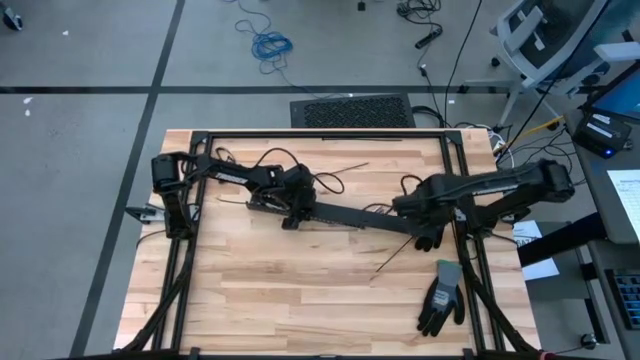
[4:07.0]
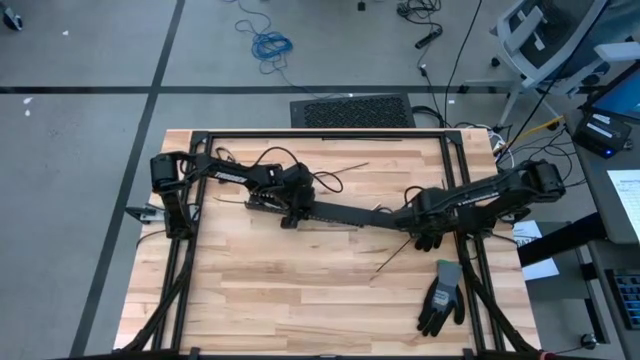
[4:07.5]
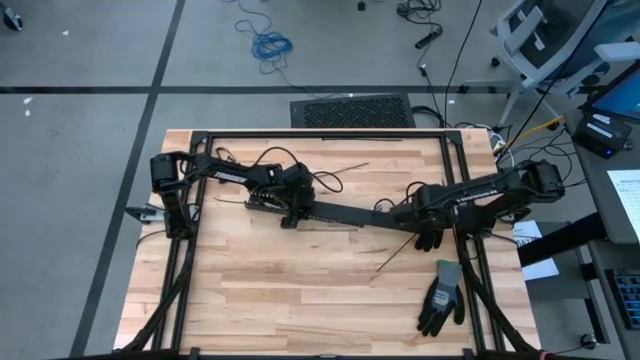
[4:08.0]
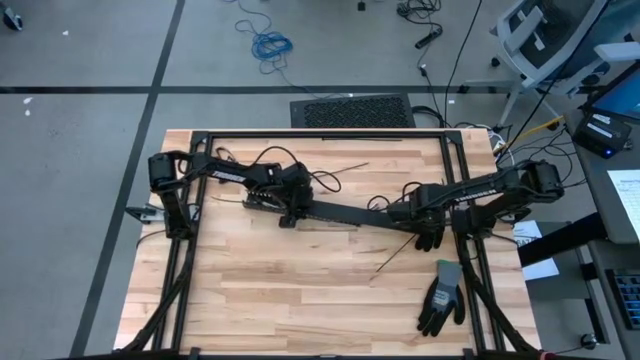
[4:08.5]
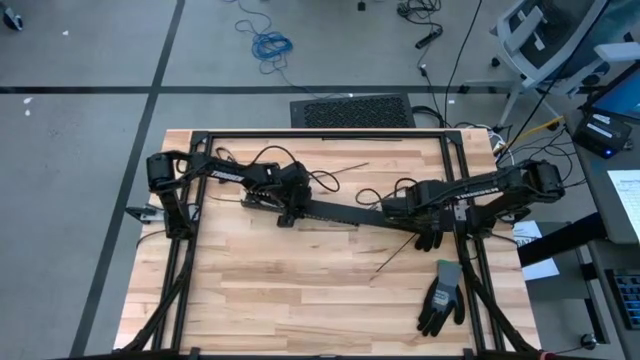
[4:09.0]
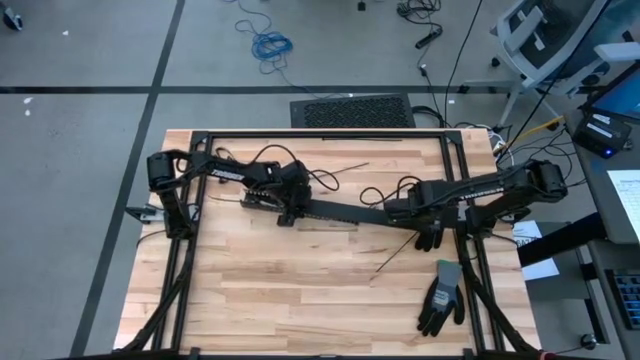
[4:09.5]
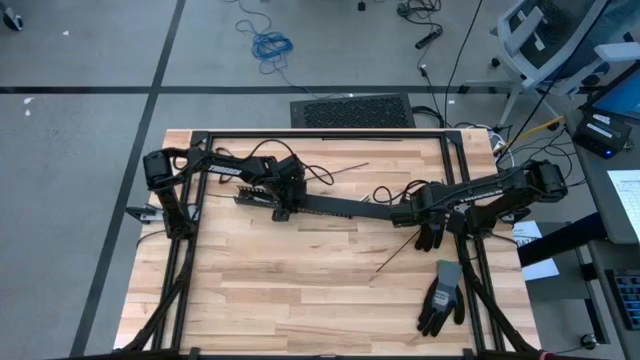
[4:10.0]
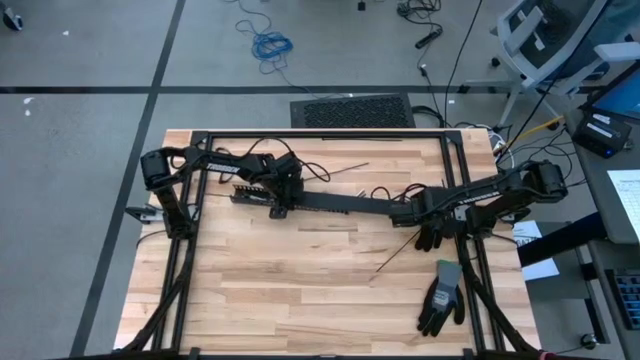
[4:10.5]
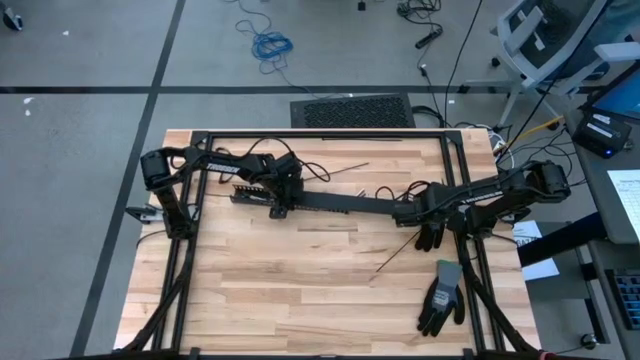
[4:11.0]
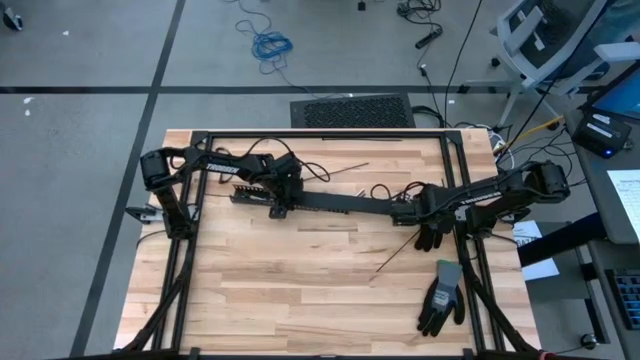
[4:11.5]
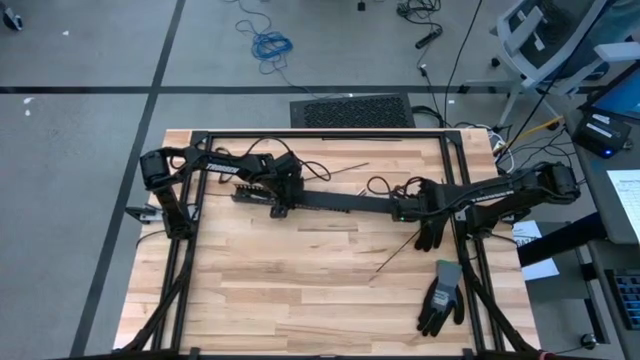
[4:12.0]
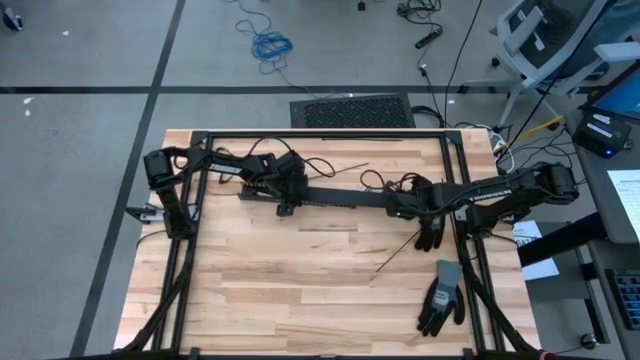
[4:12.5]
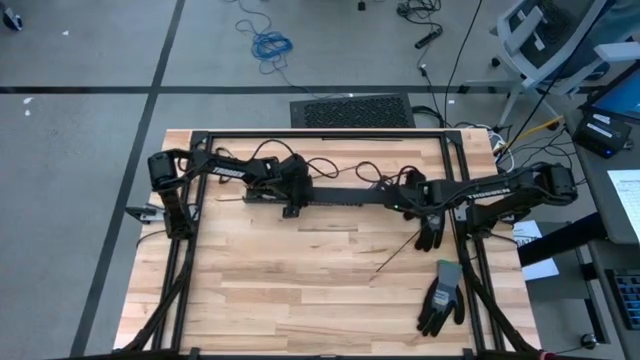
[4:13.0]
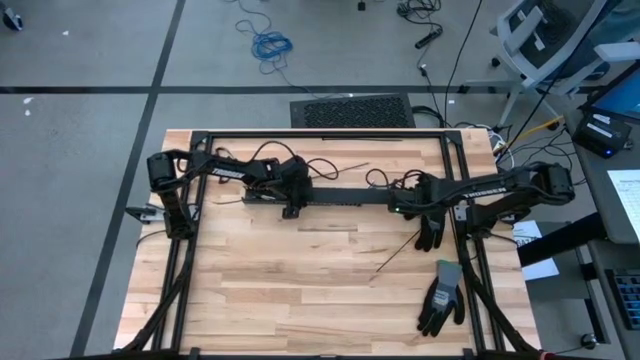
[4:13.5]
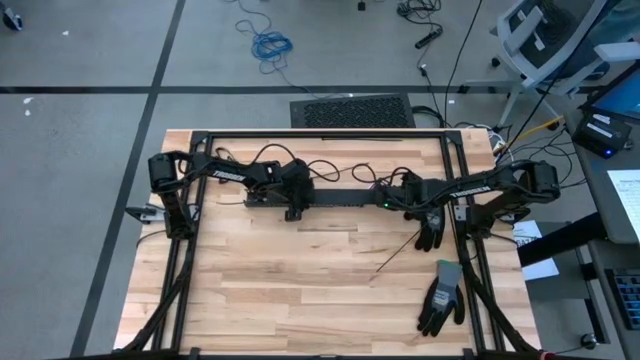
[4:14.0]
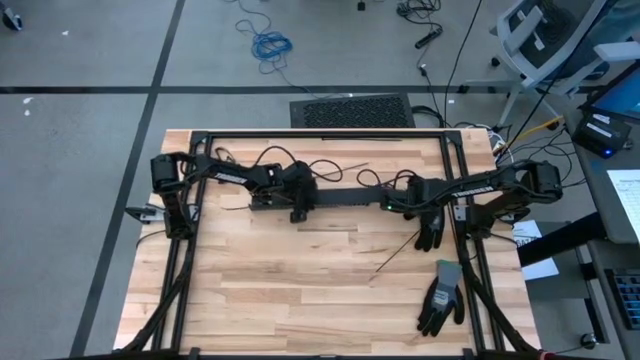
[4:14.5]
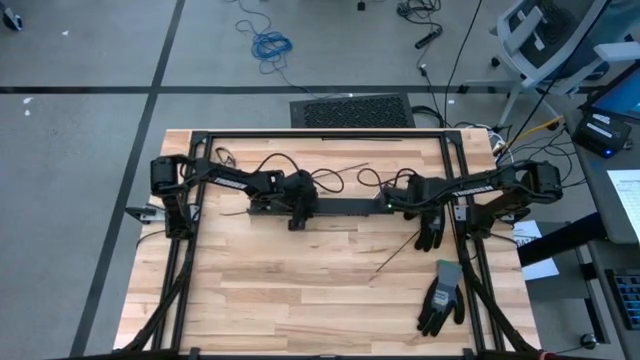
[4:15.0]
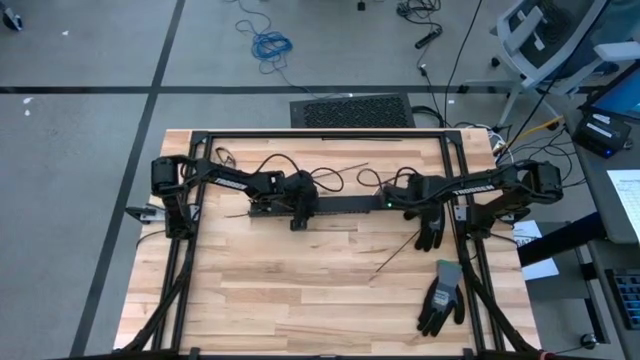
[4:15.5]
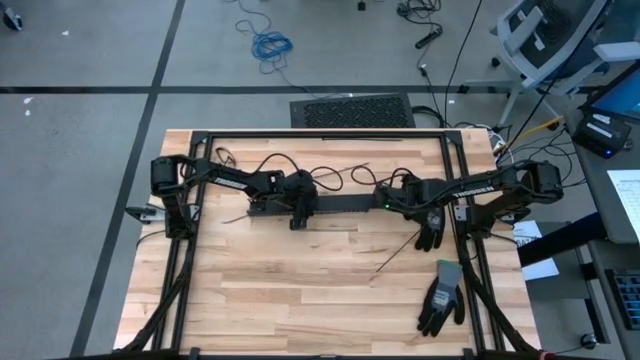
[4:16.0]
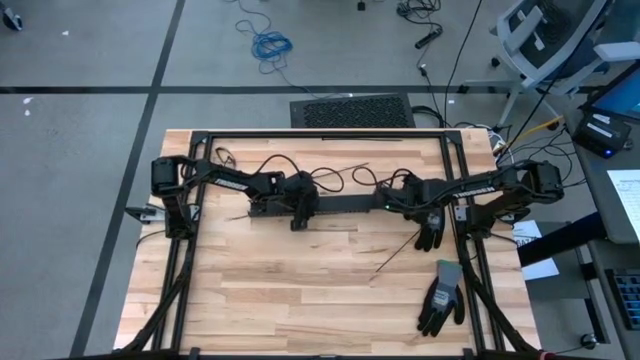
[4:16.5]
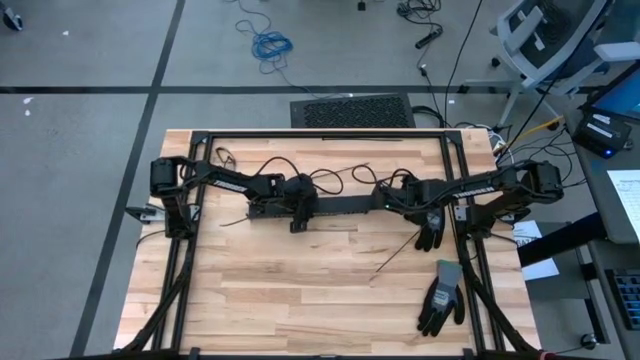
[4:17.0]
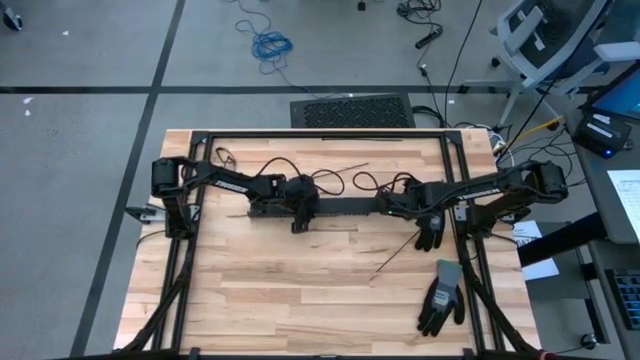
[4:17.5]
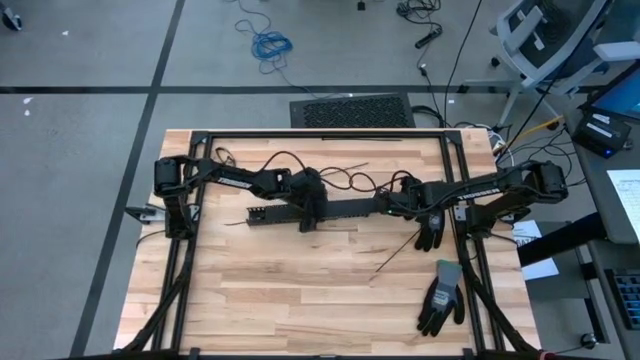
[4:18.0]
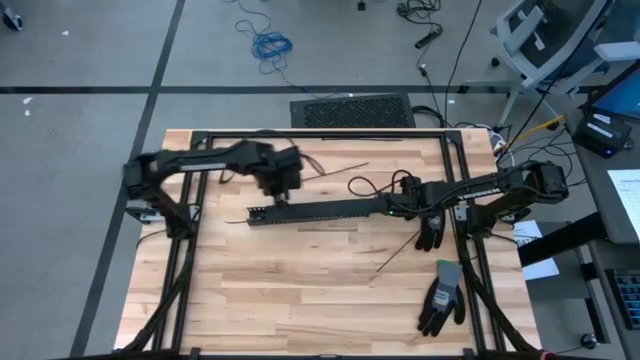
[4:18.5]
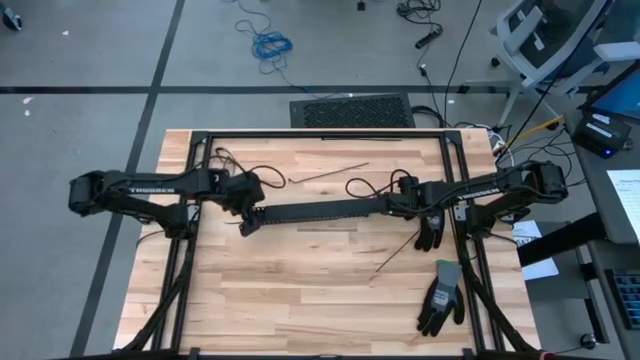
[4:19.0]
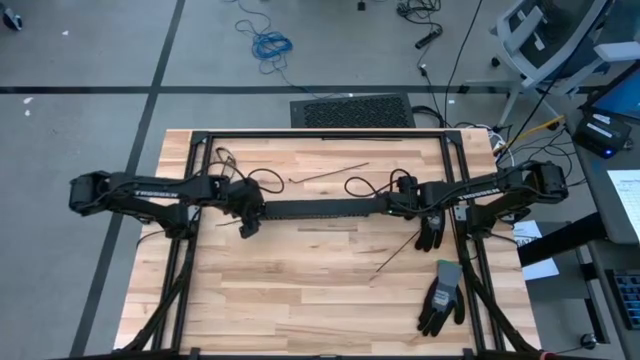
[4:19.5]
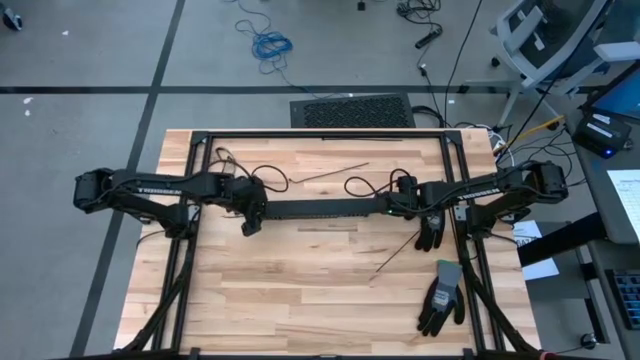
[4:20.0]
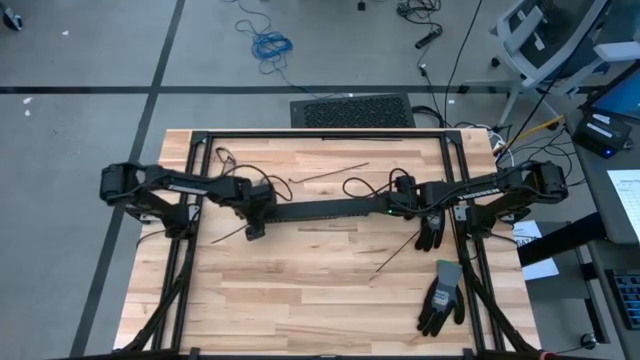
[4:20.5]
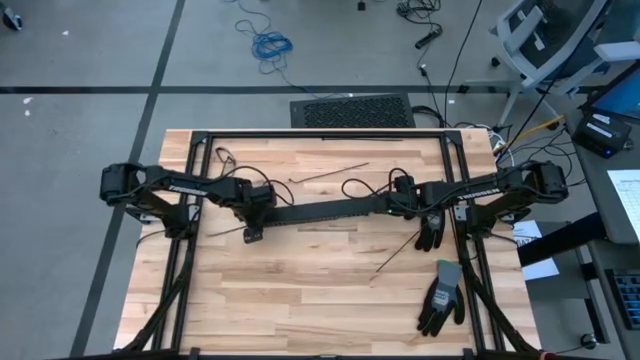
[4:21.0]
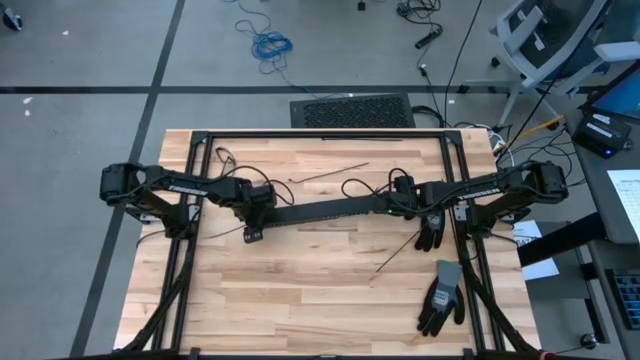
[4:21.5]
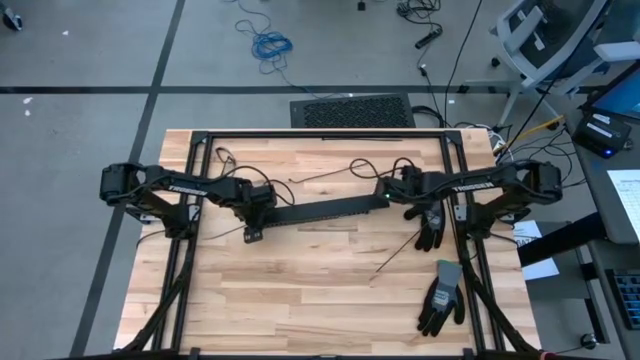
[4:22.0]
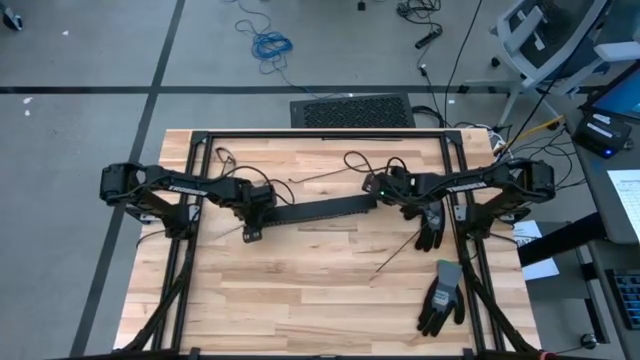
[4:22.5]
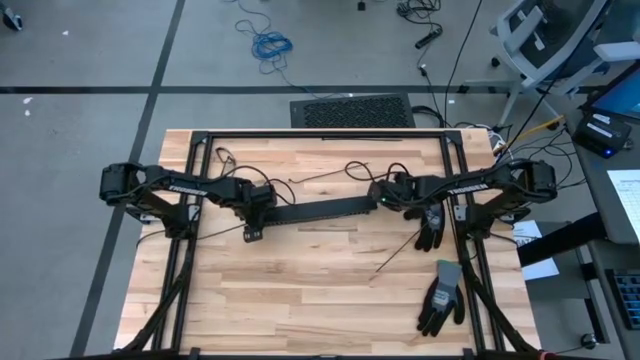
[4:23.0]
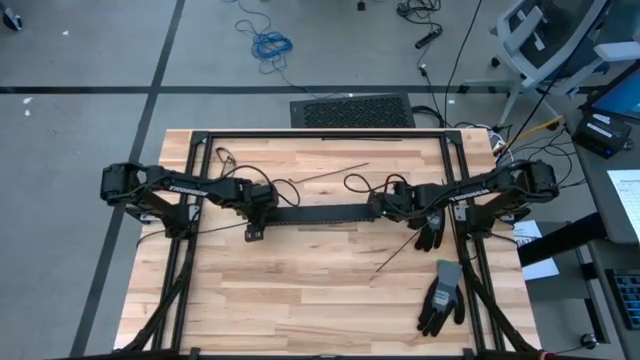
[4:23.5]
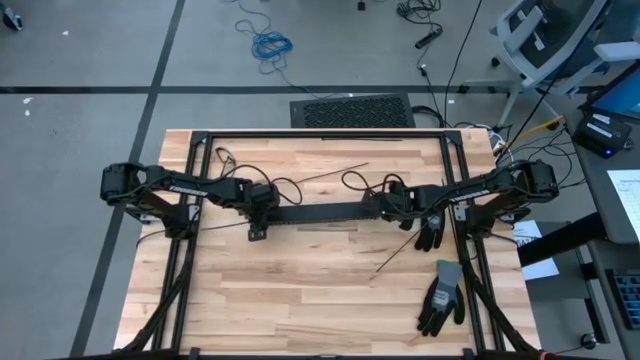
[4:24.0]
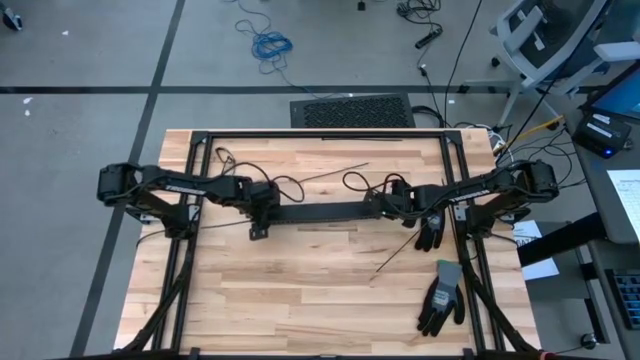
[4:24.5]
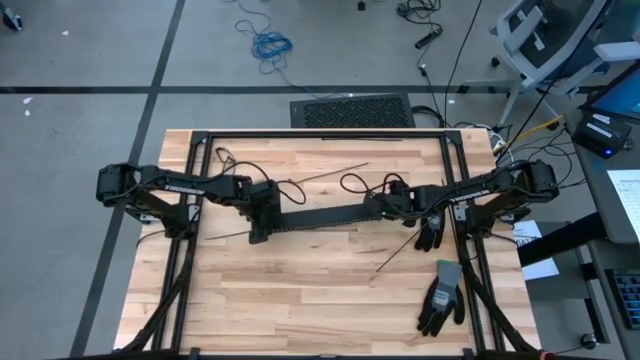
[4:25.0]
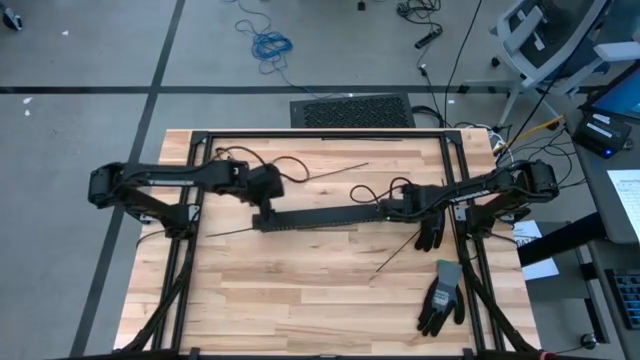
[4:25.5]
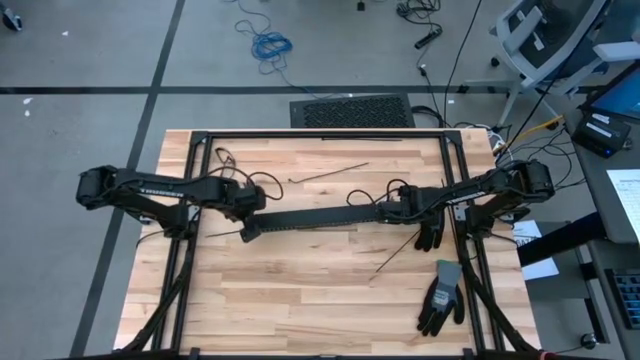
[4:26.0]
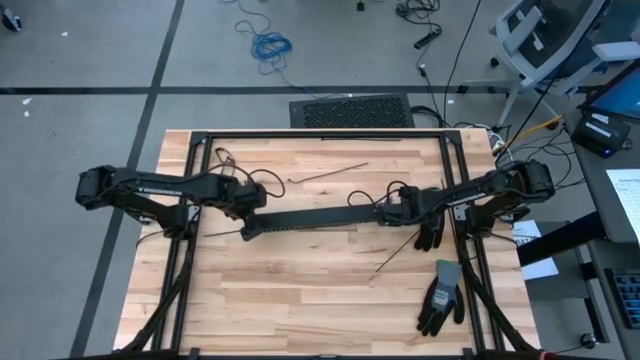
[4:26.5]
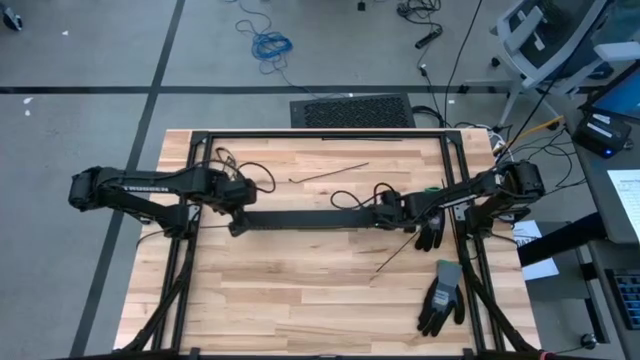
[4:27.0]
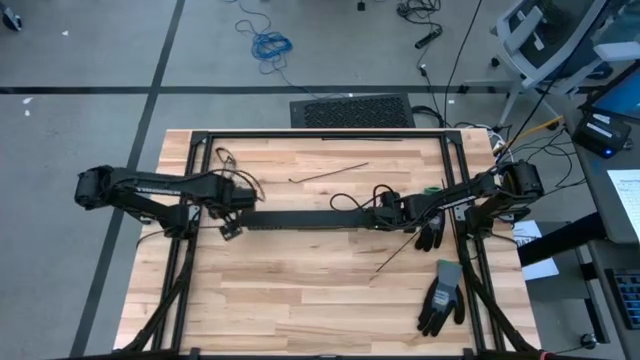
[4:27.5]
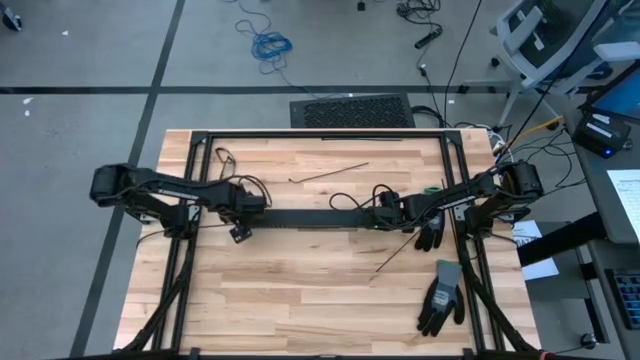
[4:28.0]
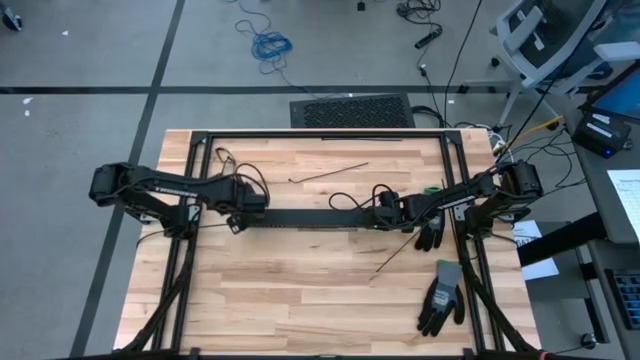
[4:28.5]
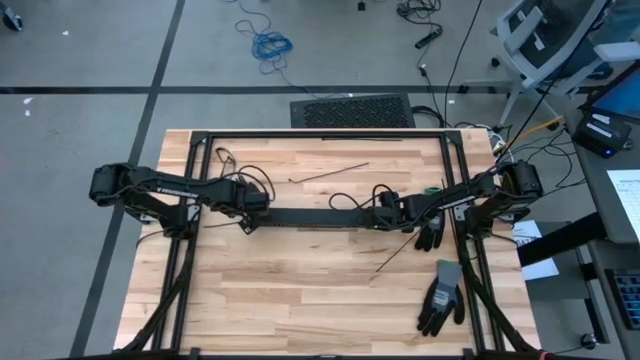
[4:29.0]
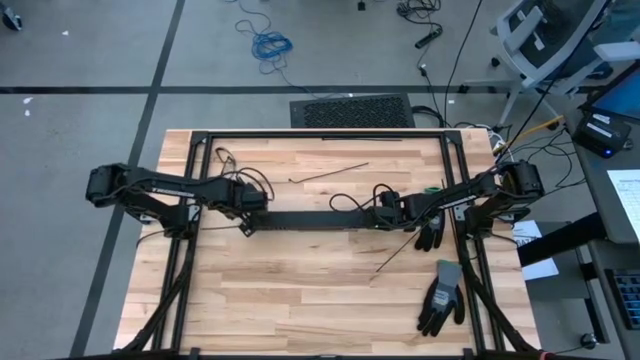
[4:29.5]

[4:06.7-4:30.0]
Task: Ziptie cables
Close the black cable duct cover
